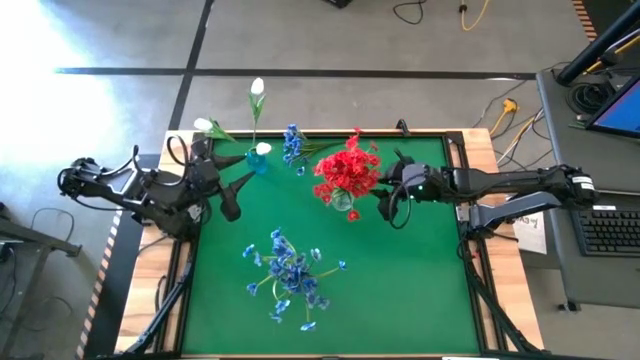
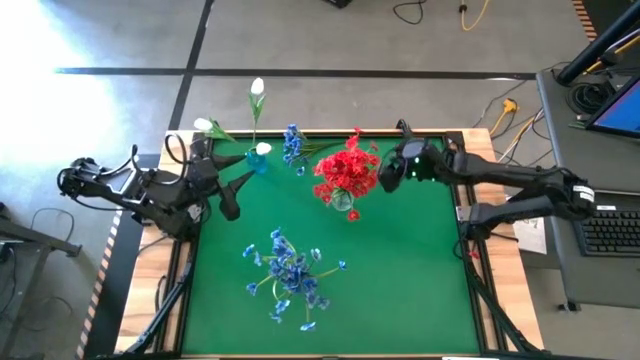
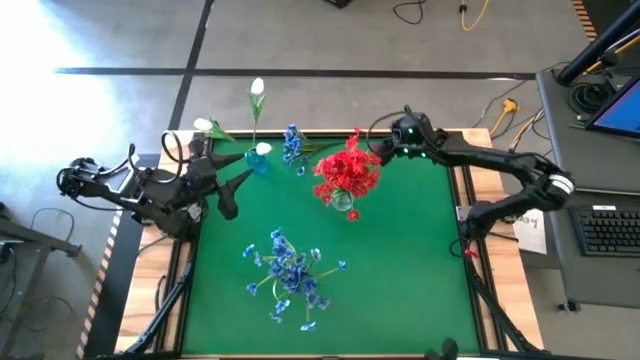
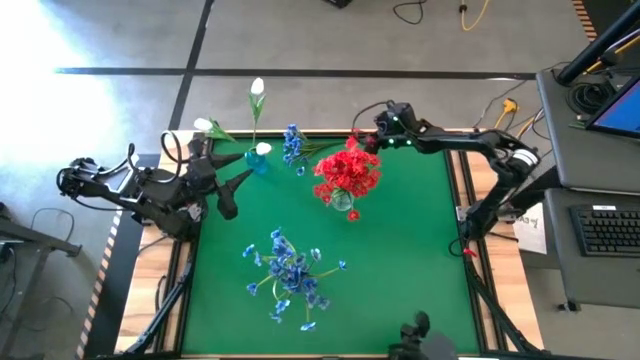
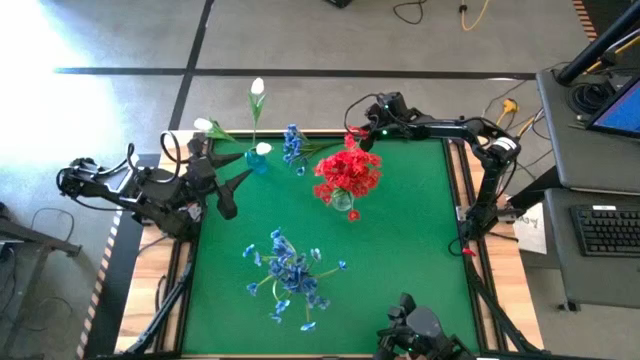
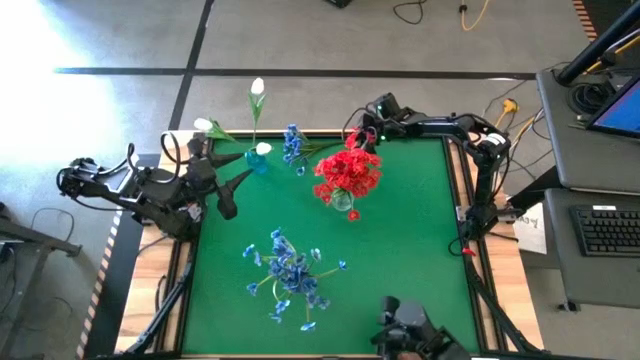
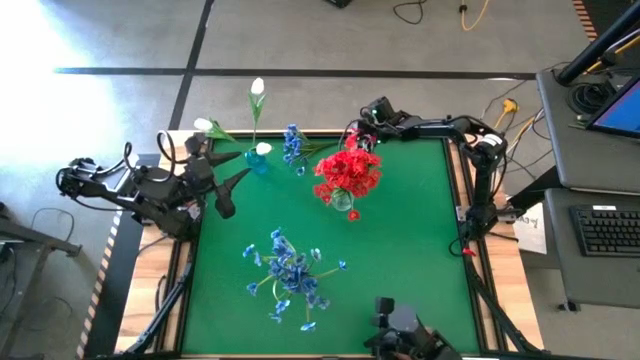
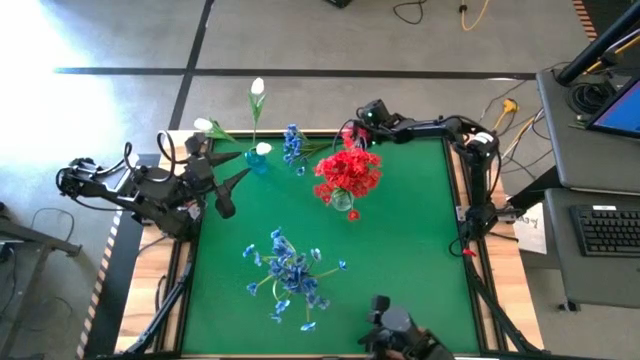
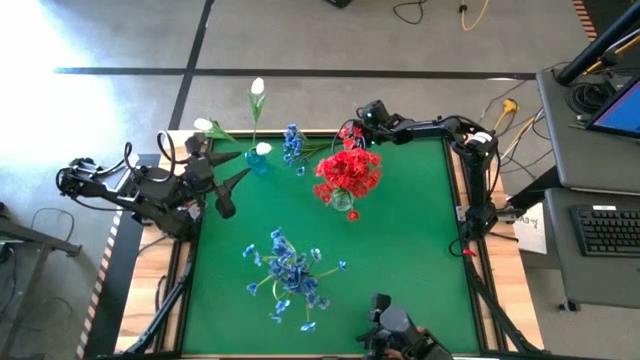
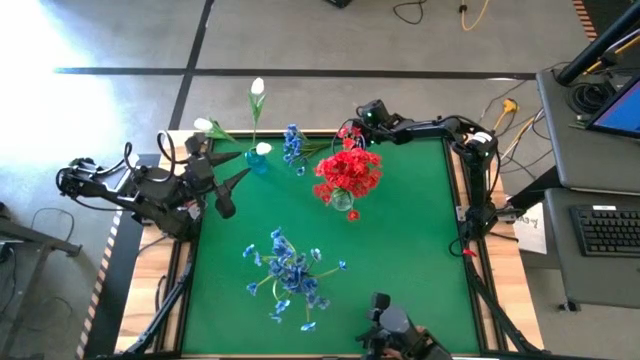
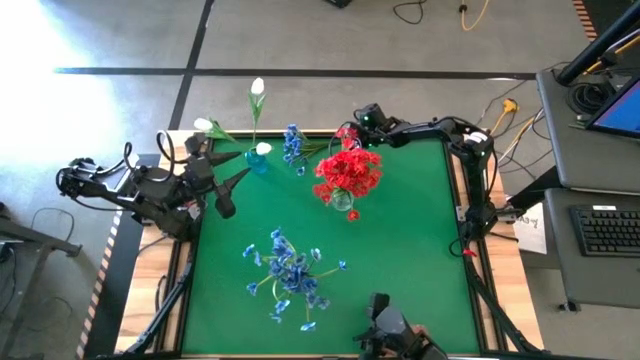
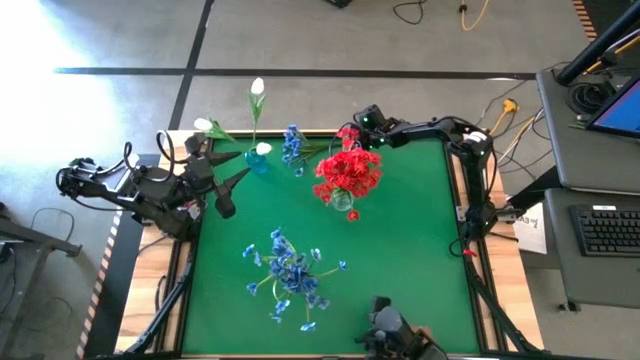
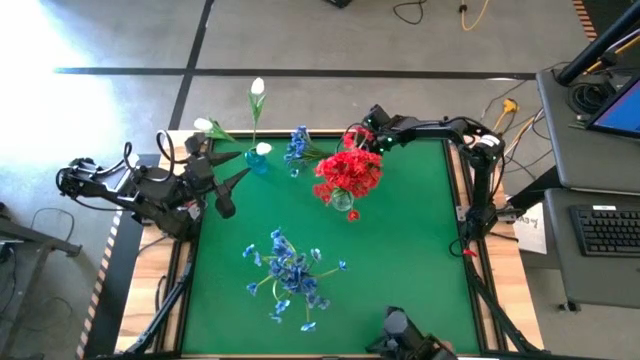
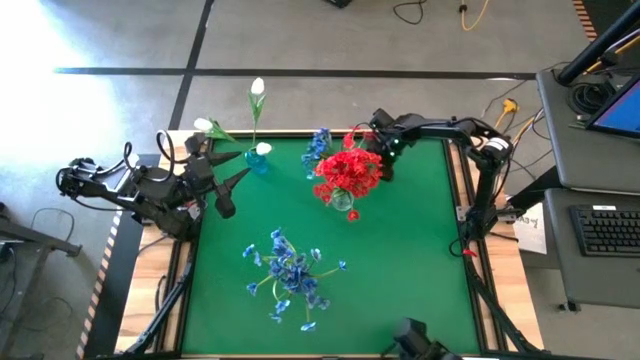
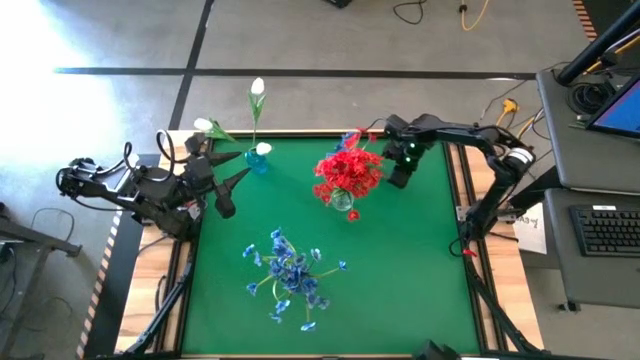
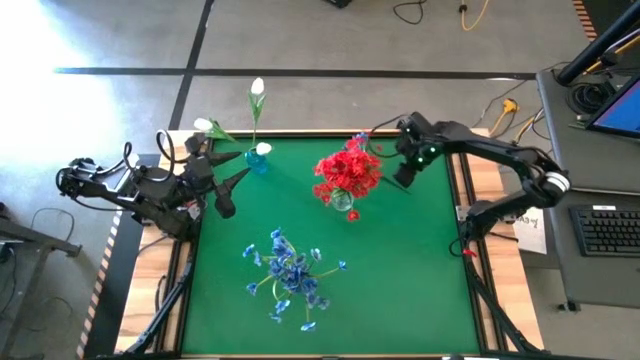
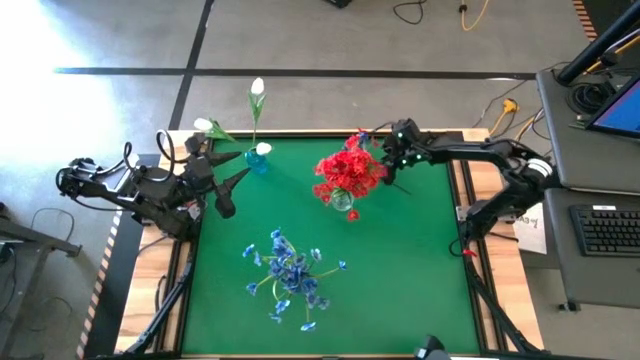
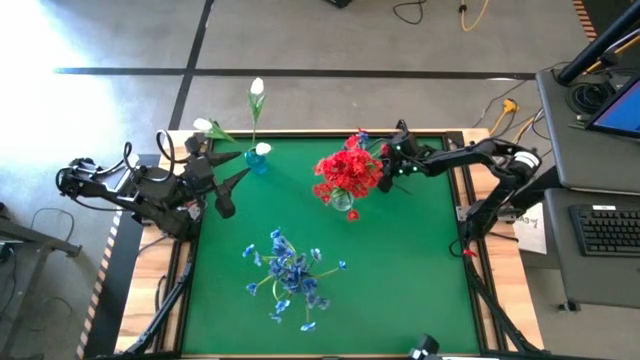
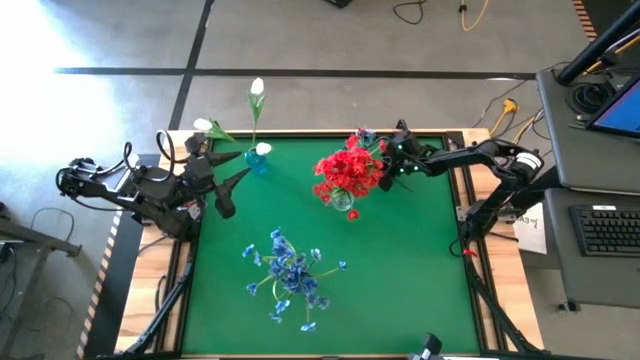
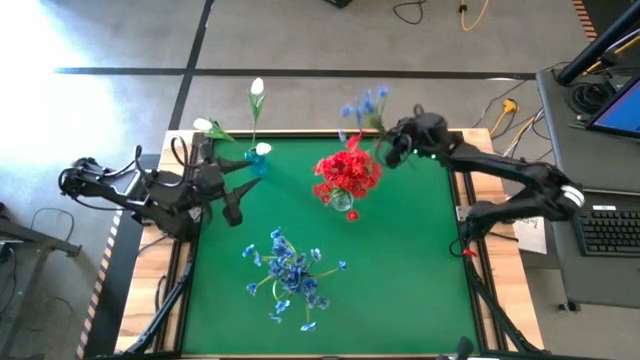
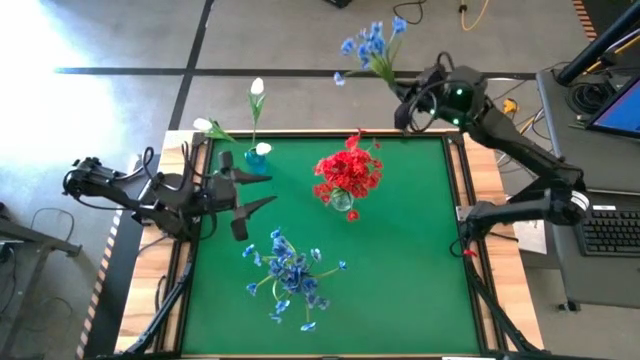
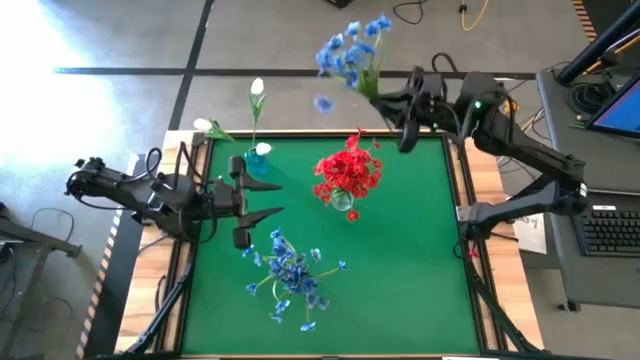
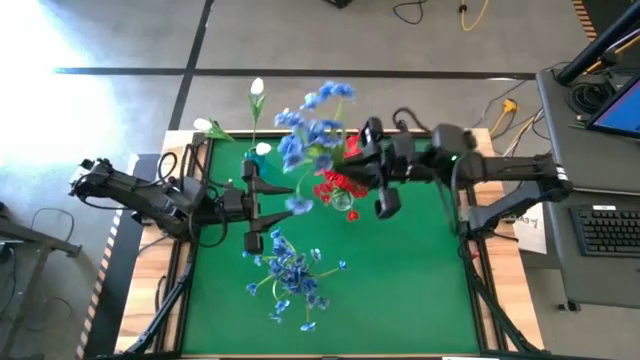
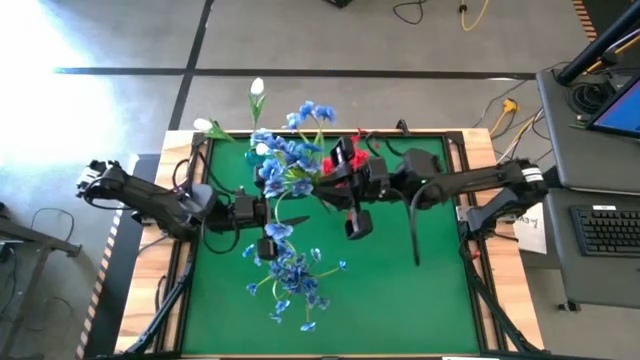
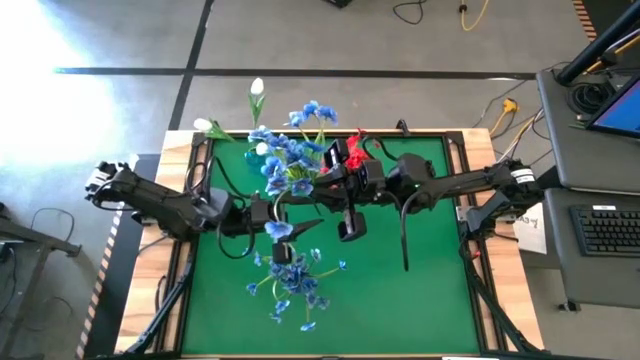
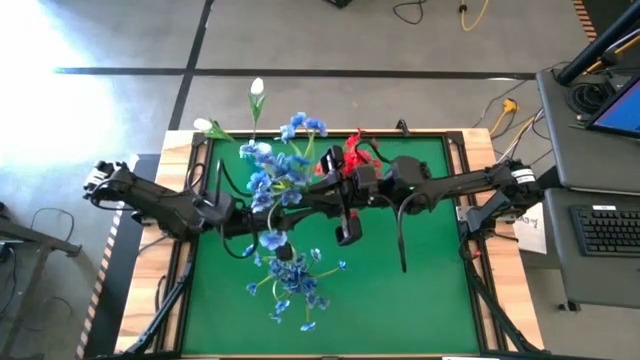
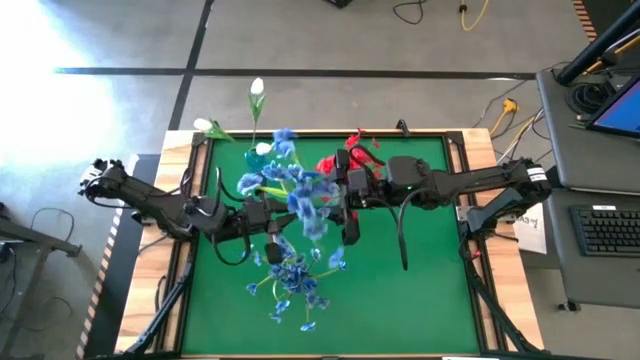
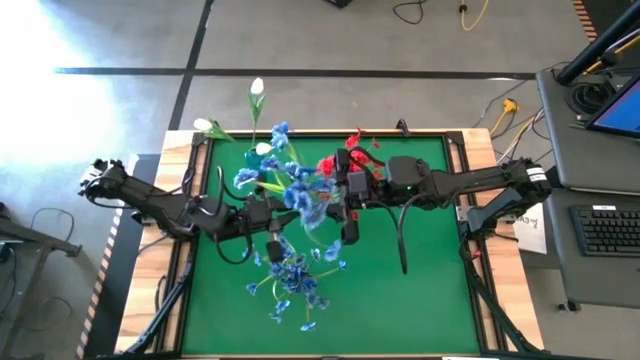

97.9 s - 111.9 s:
Task: Sort flowers into vase by color
Put the blue flowers into the violet vase

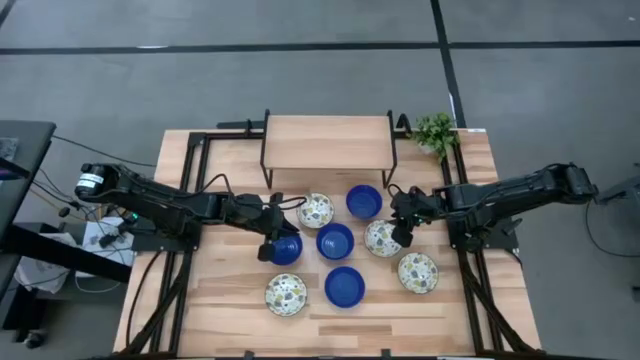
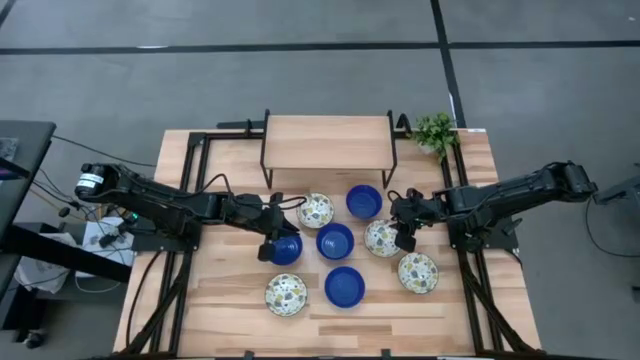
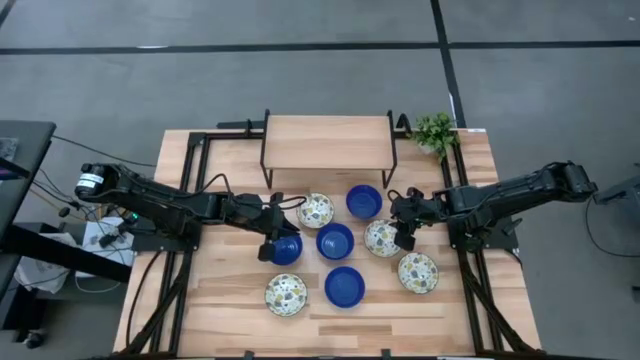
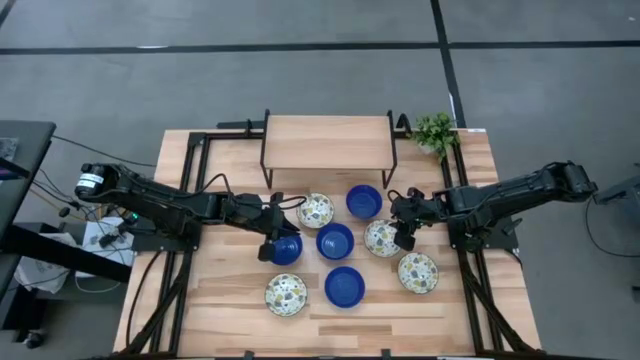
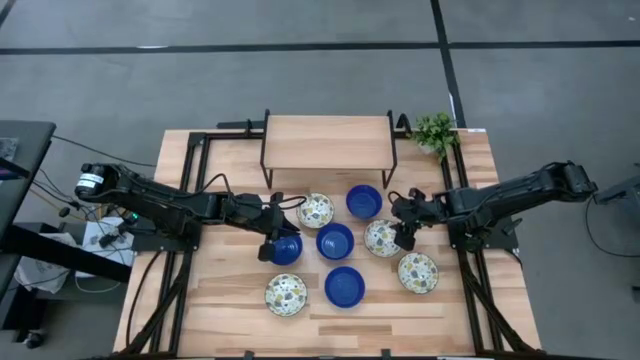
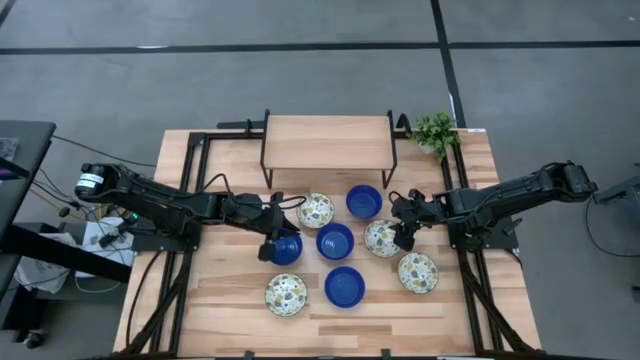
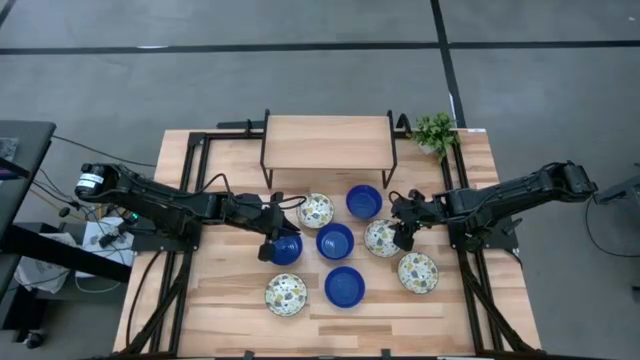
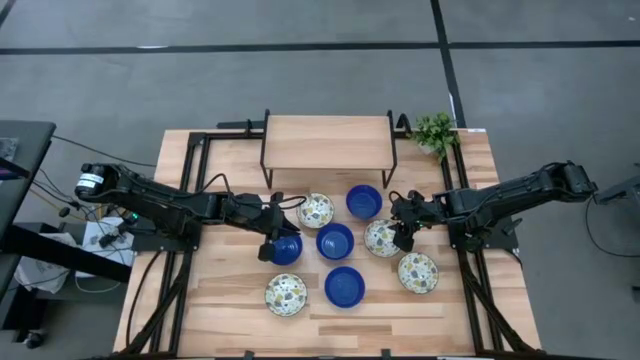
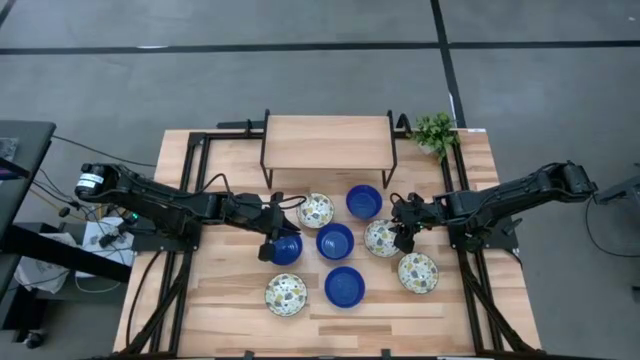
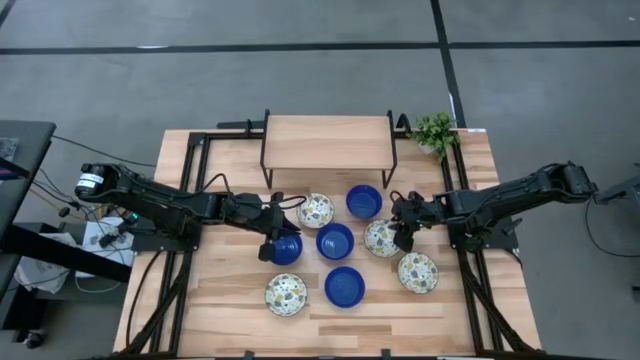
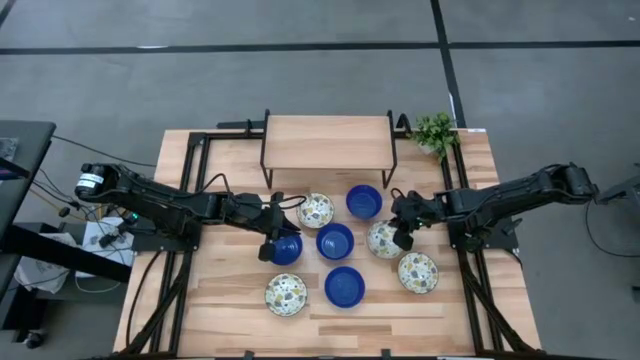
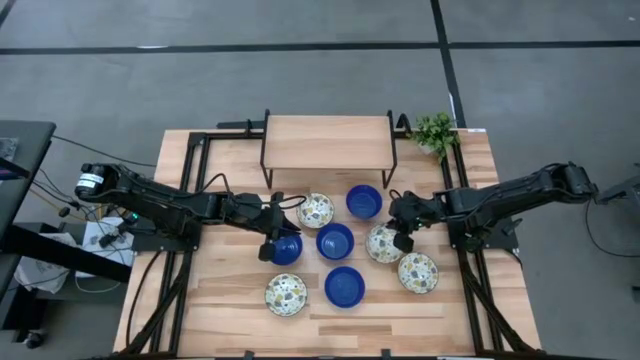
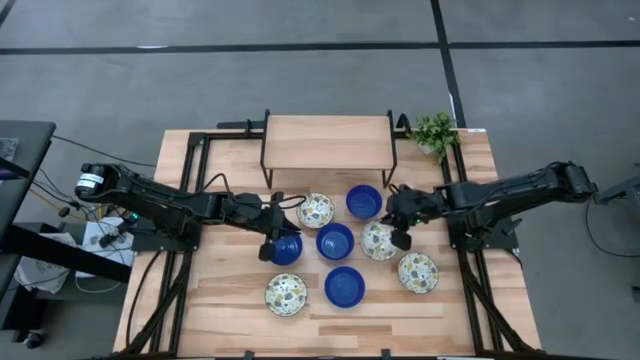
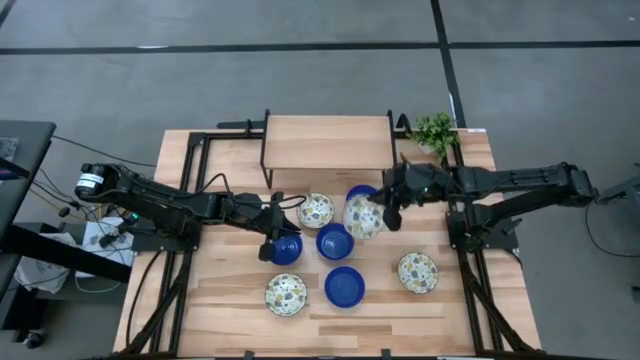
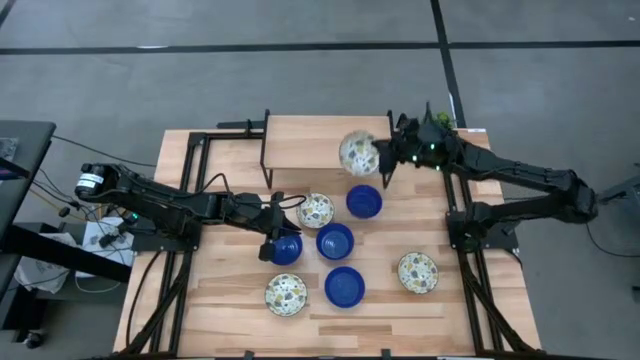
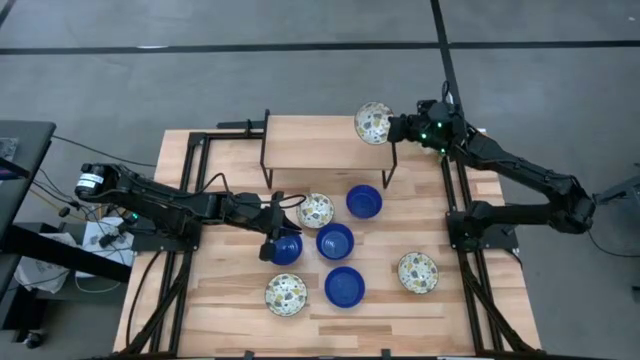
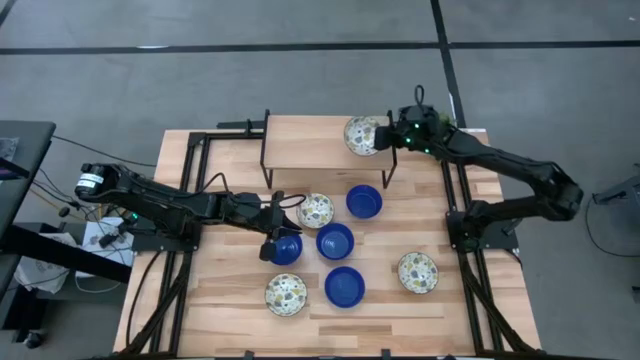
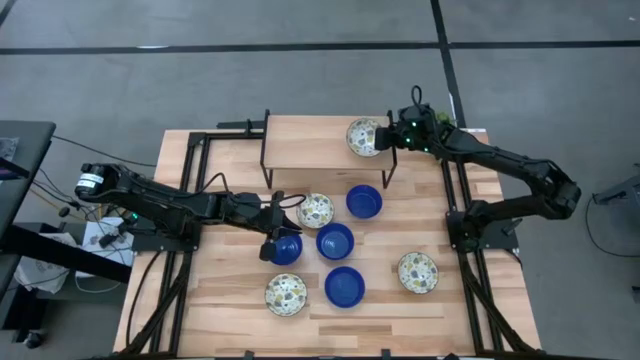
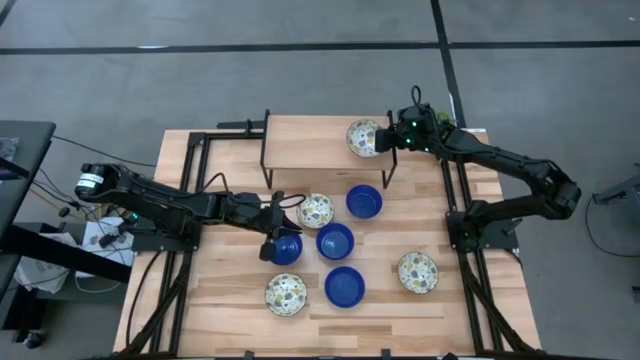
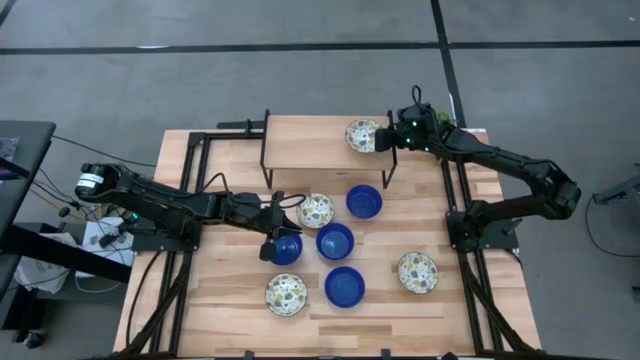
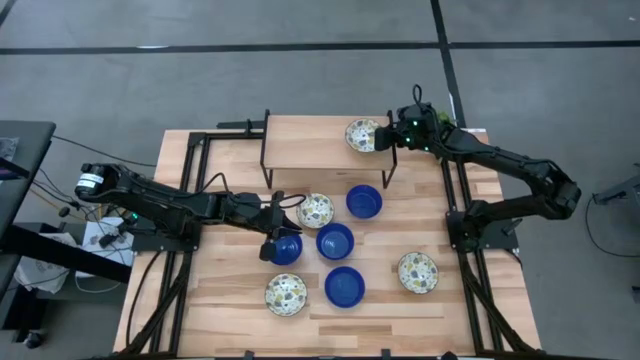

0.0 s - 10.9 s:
Task: Pick & Place Mini bowls
Put the yellow patterned bowl on the shelf
